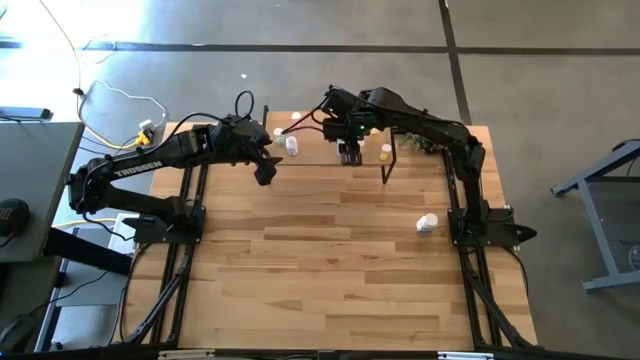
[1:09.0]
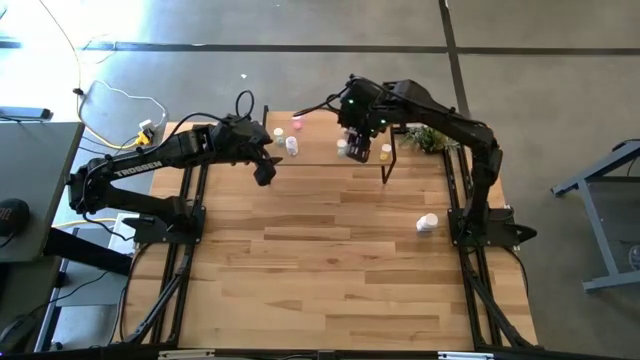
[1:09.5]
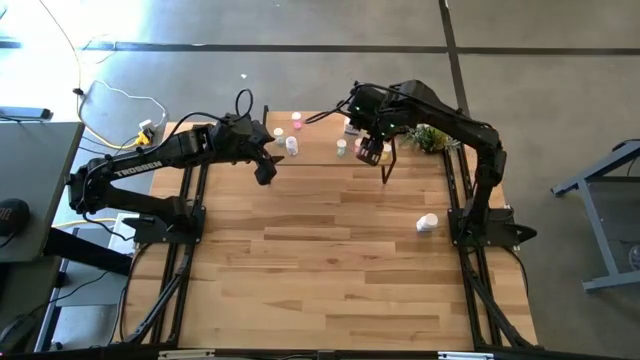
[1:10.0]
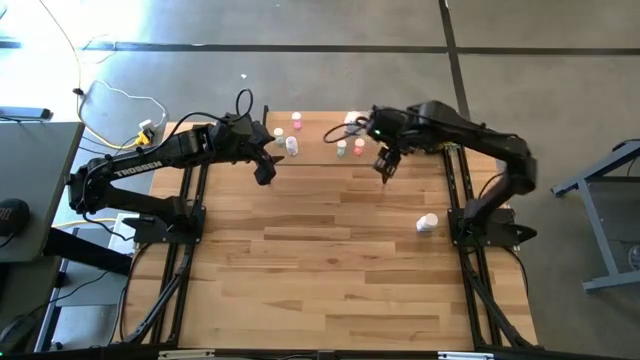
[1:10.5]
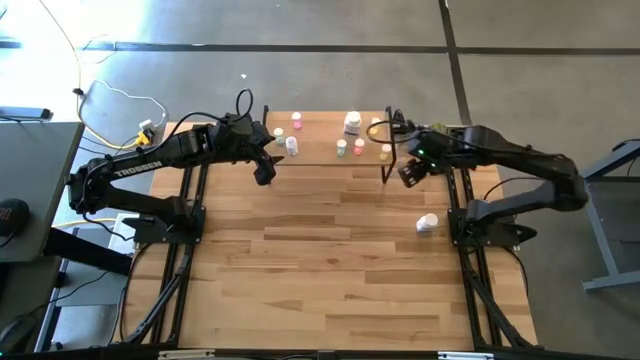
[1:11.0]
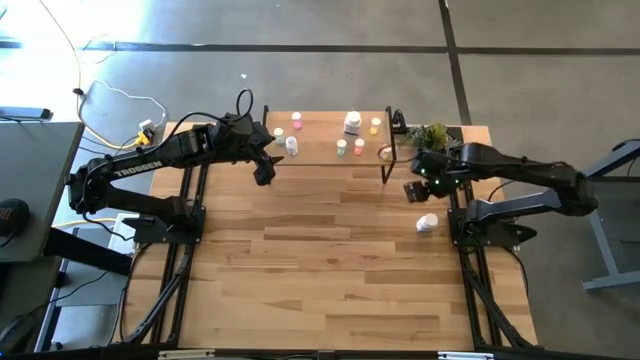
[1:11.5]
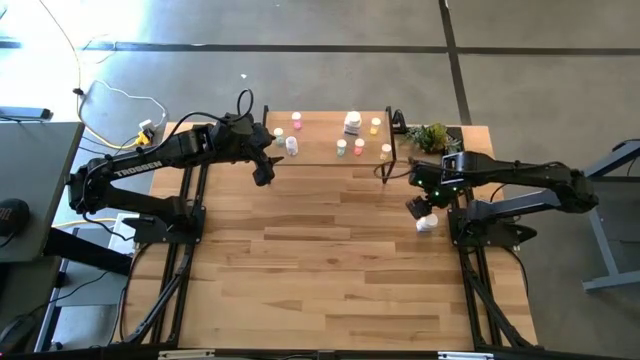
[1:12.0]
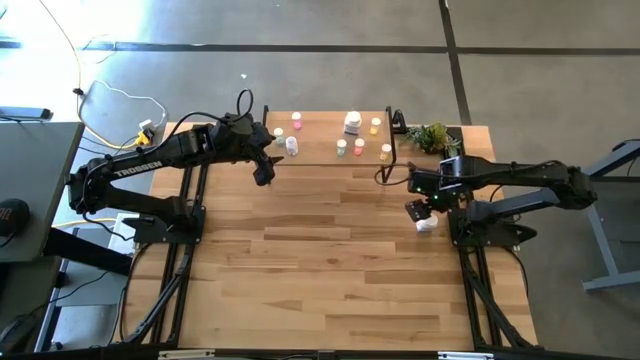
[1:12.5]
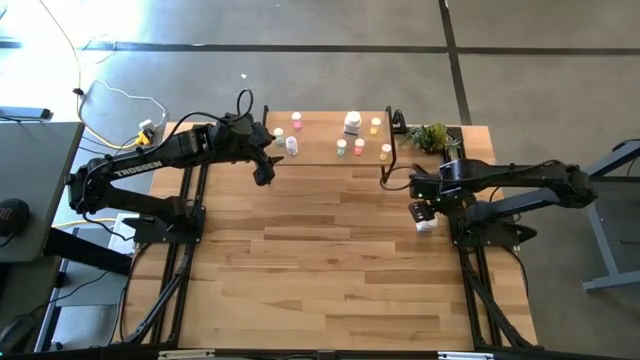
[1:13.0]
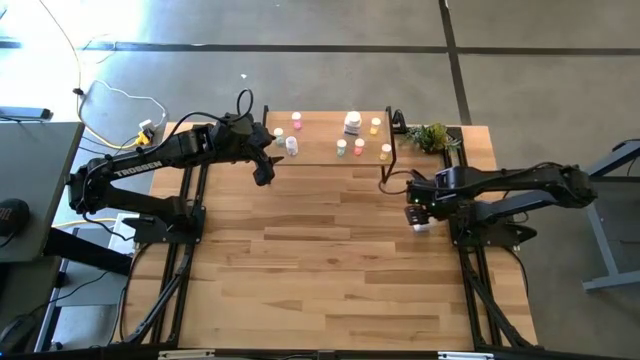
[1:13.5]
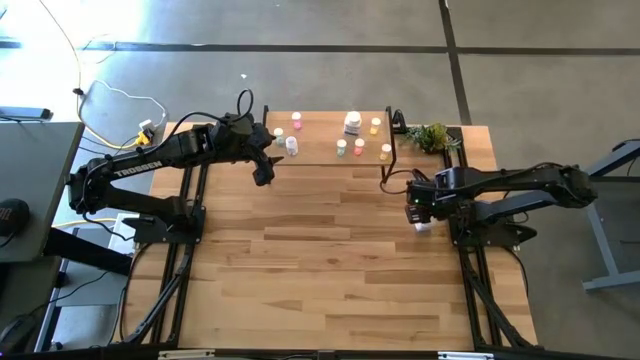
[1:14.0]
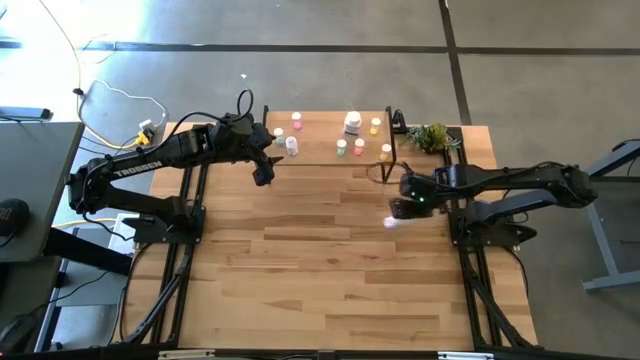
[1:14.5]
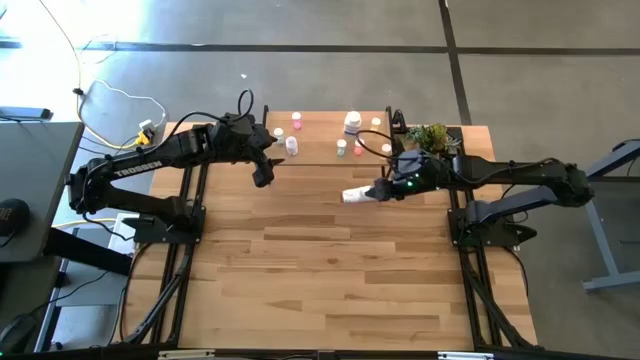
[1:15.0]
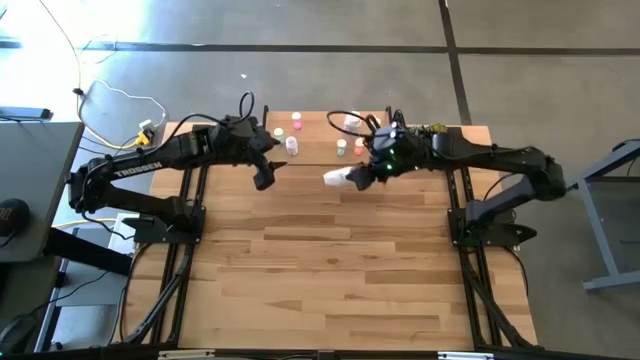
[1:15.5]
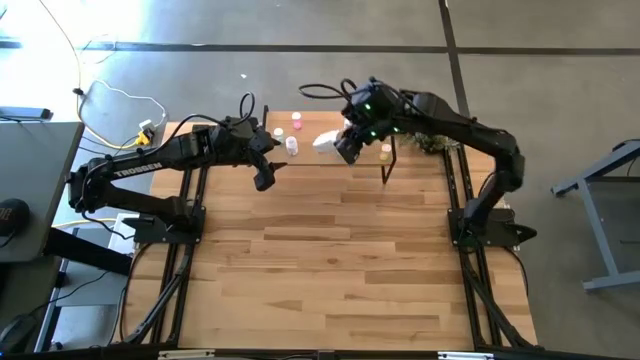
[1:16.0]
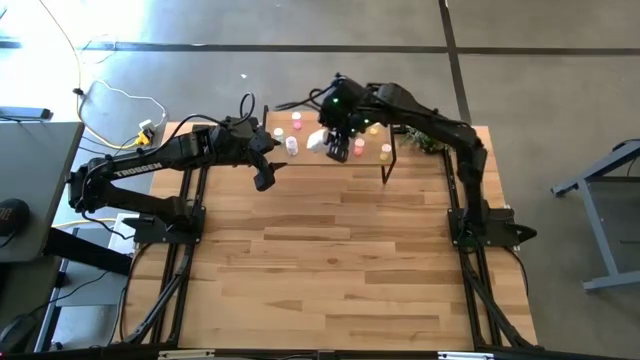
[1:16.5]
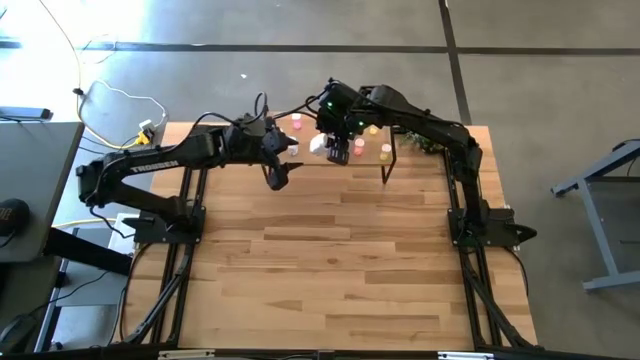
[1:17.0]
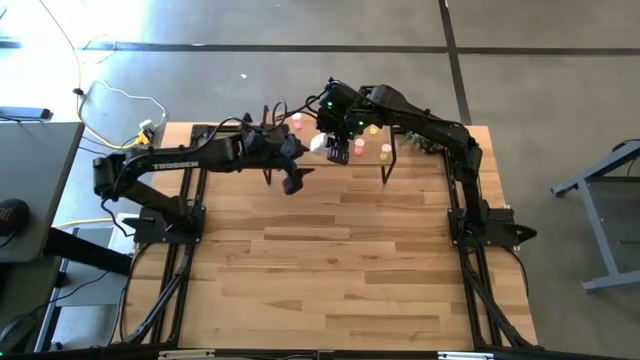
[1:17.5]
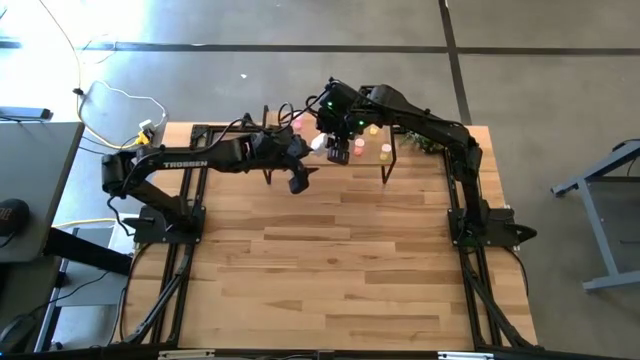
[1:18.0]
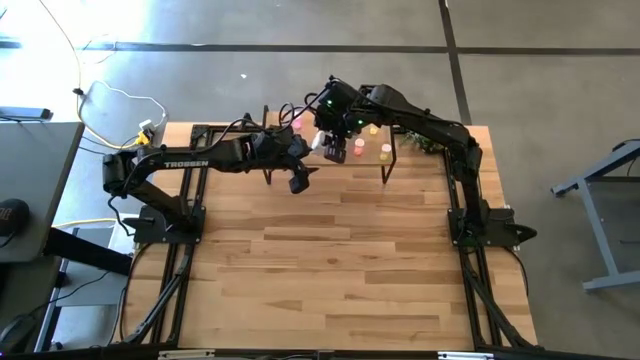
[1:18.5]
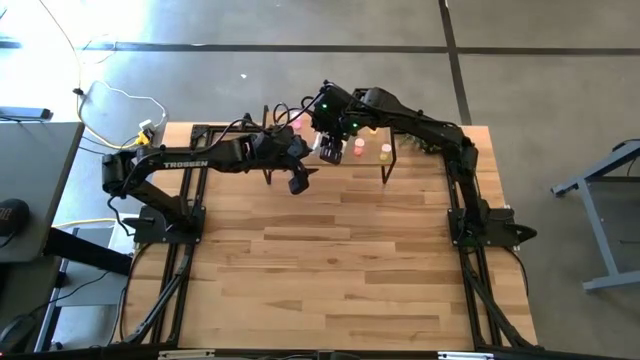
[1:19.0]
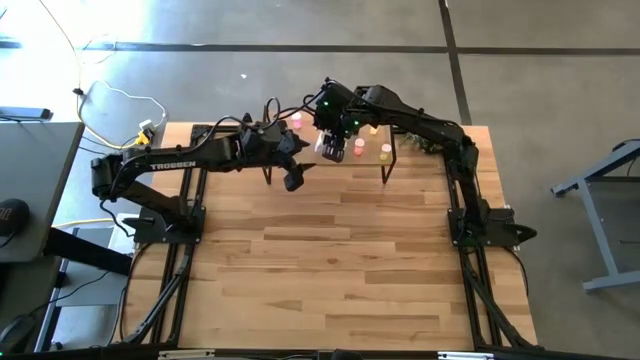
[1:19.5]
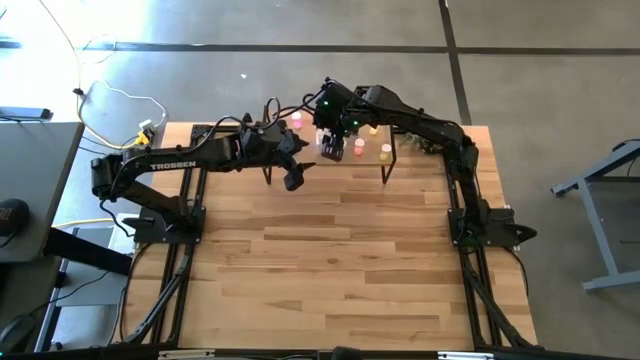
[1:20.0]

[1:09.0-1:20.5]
Task: Pick and place medicine bottles onto shelf by color
Put the white pill bottle on the shelf

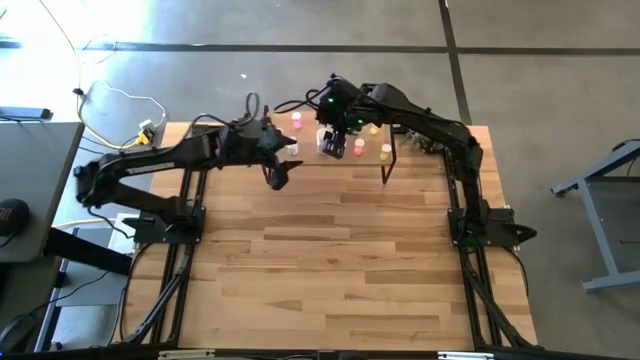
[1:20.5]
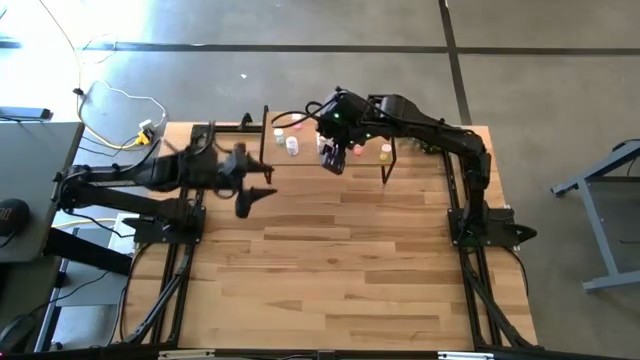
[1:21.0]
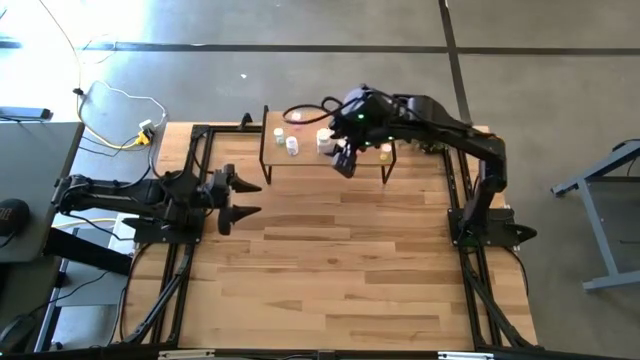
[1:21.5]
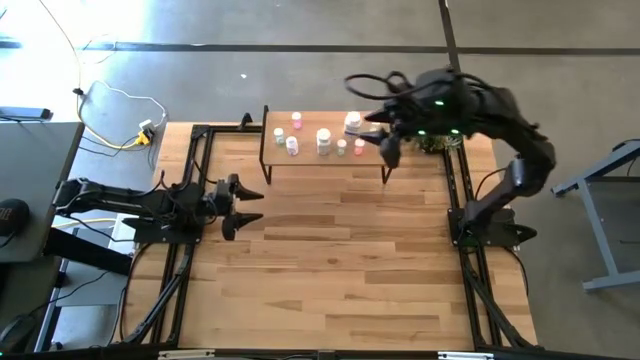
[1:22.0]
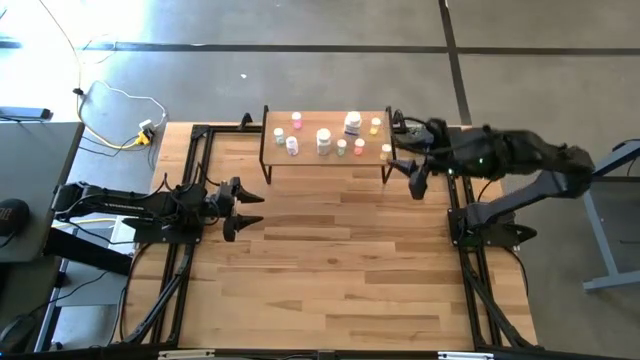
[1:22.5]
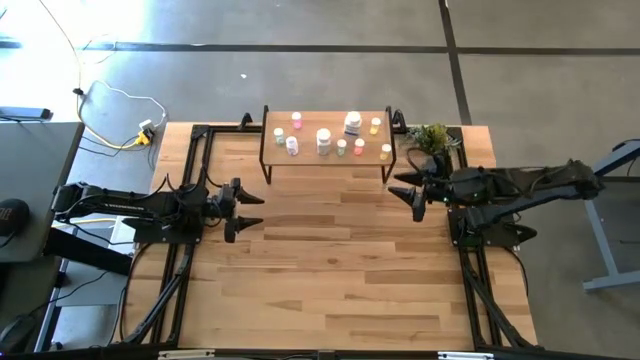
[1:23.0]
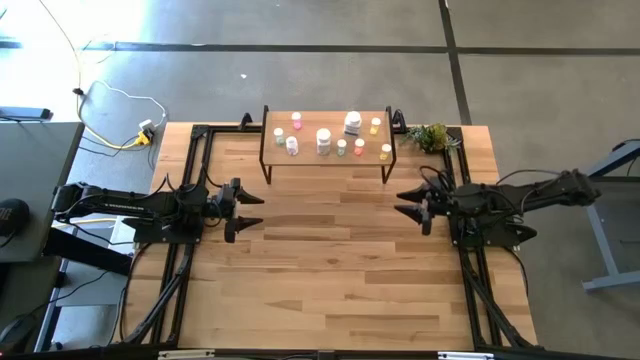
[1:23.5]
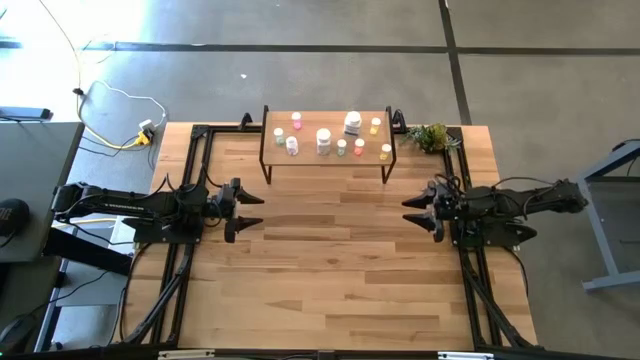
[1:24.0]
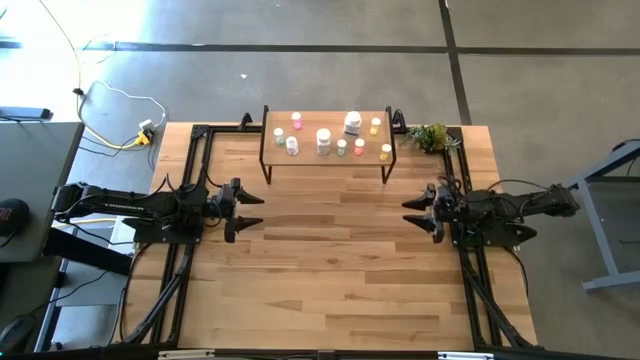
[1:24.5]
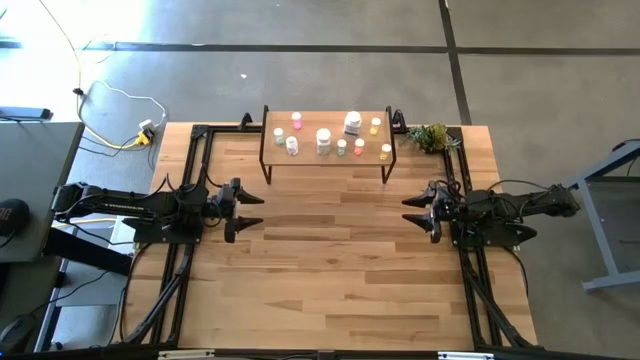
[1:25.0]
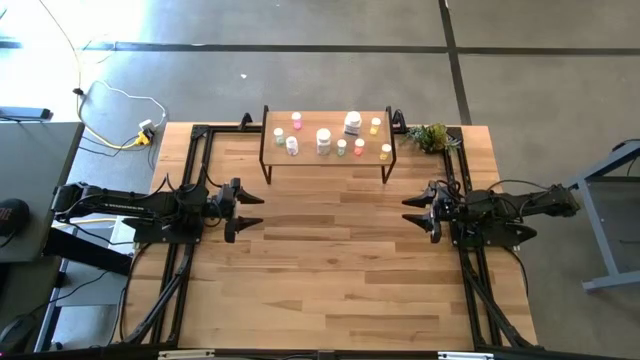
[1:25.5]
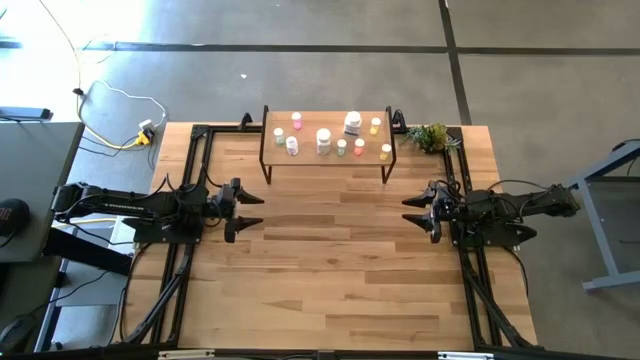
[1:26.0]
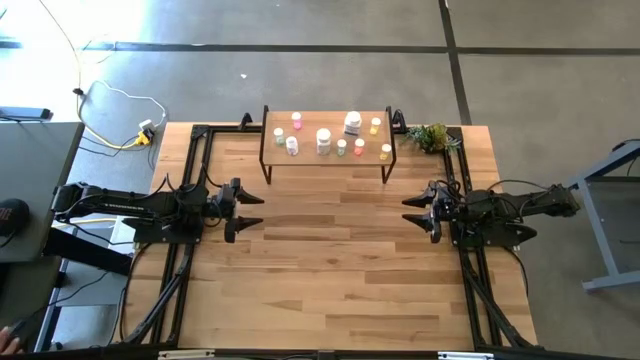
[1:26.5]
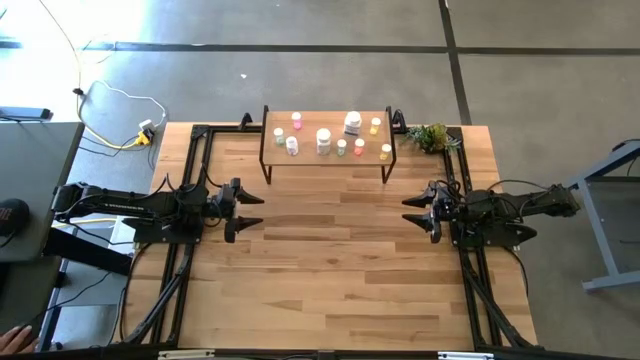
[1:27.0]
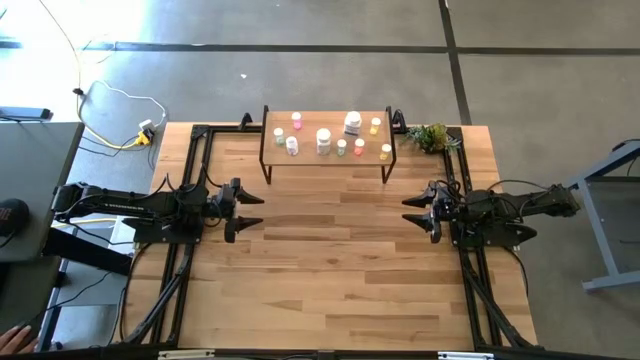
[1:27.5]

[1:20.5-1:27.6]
Return to Home Position

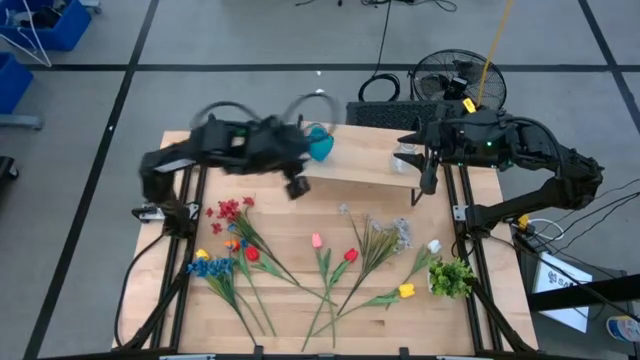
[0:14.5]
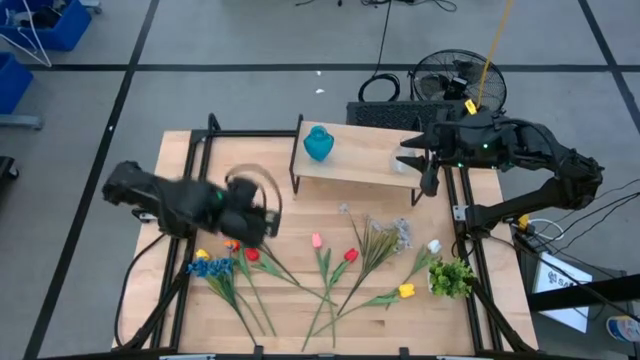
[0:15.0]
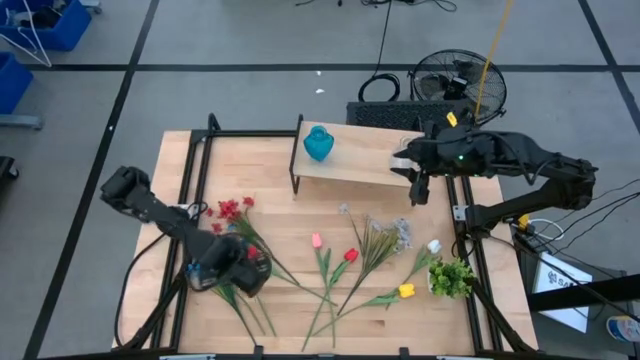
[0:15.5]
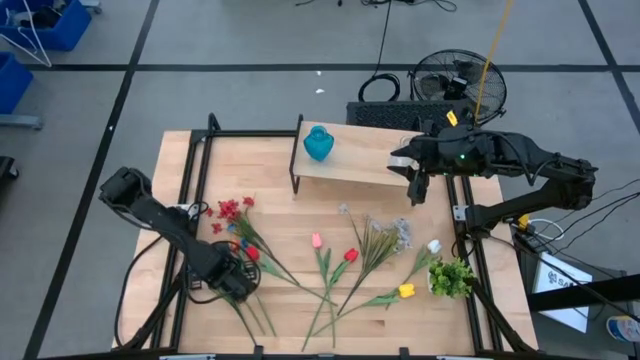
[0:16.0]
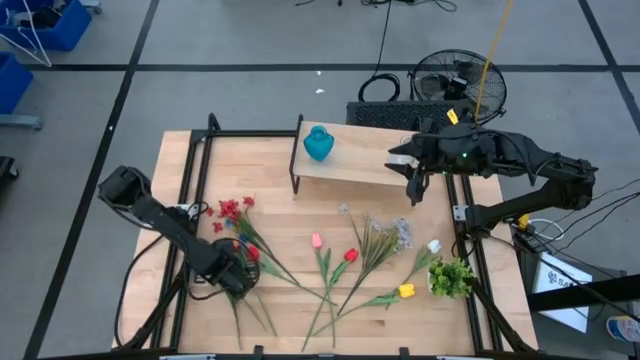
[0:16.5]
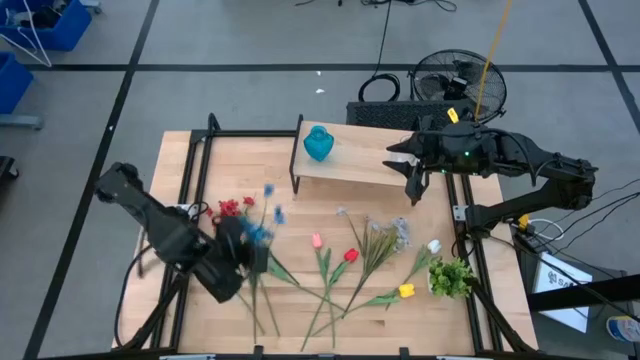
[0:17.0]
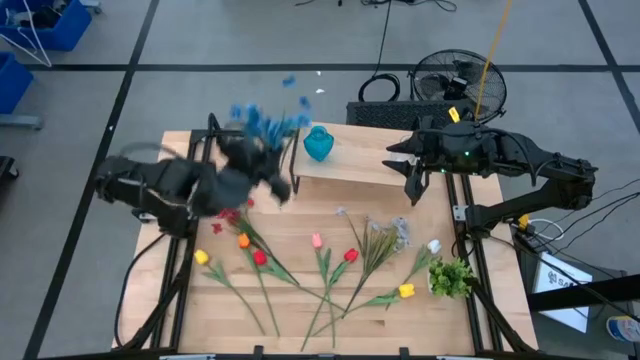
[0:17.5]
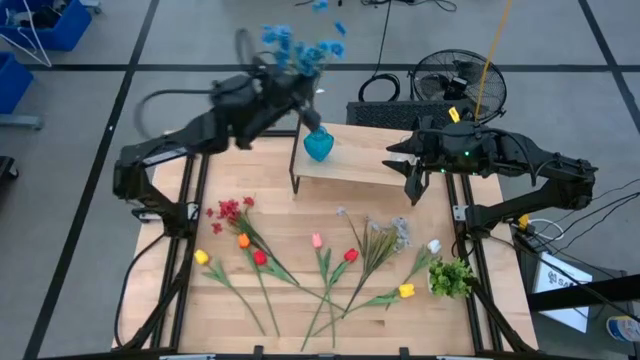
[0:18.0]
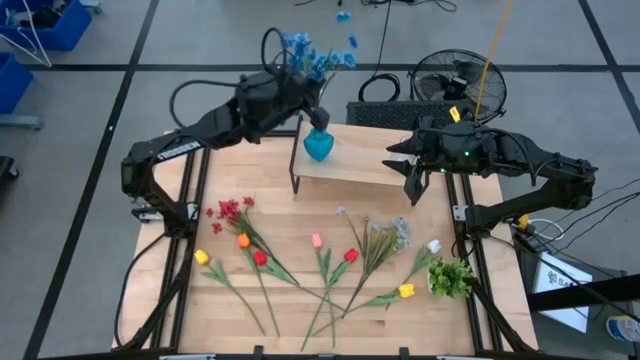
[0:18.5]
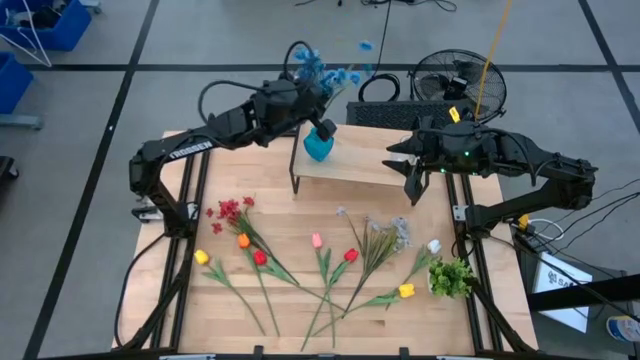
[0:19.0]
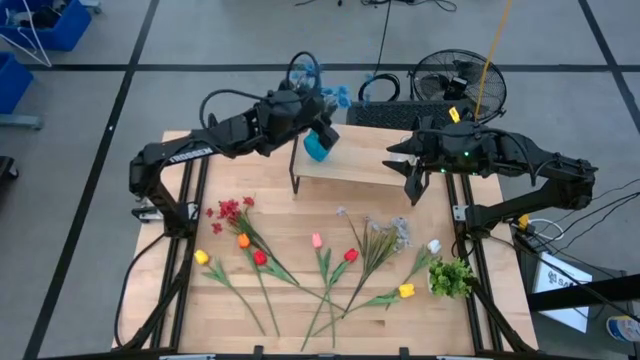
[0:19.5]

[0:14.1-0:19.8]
Task: Pick and place flowers into a vace then onto a shelf
Put the blue flowers into the blue vase on the shelf
